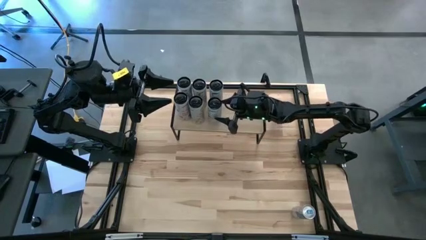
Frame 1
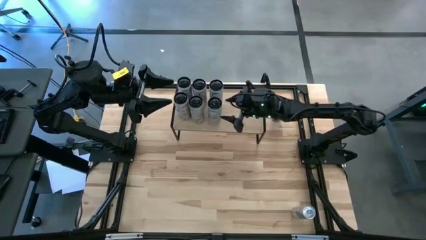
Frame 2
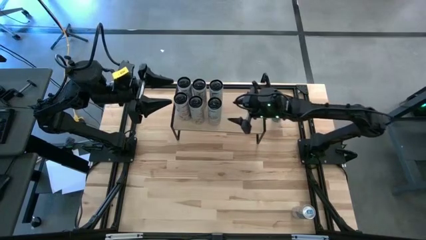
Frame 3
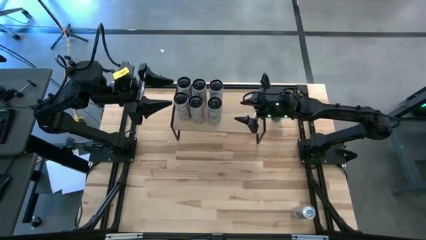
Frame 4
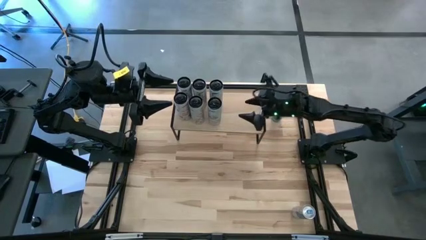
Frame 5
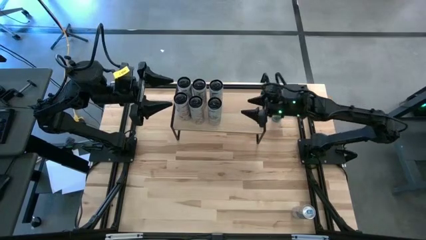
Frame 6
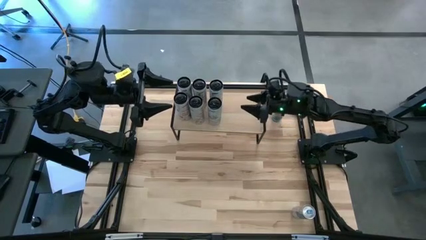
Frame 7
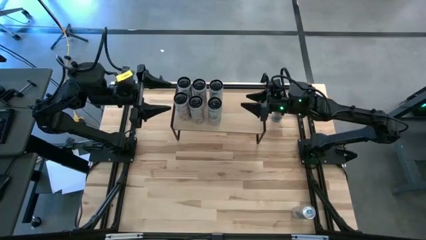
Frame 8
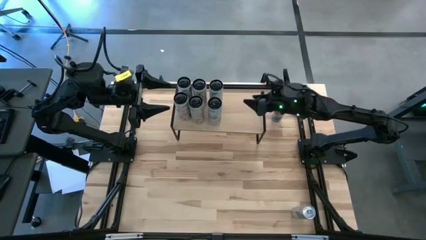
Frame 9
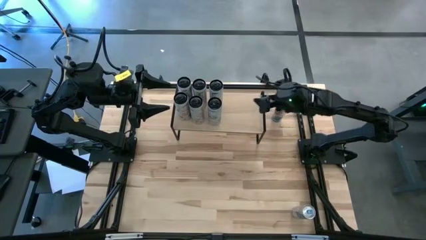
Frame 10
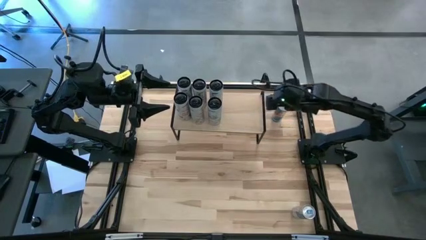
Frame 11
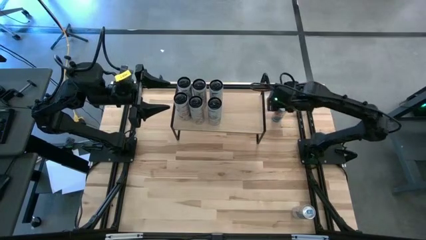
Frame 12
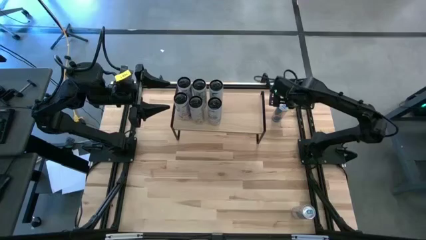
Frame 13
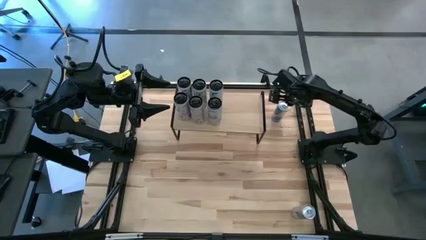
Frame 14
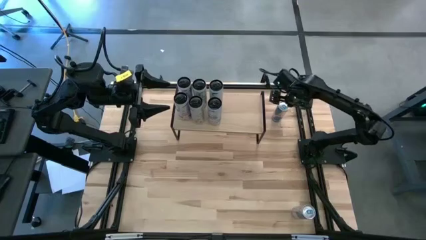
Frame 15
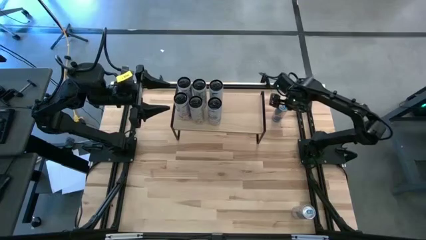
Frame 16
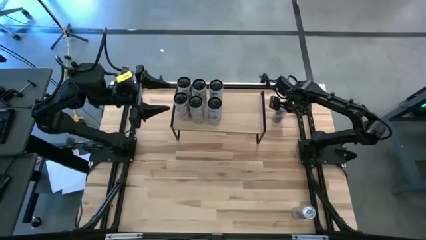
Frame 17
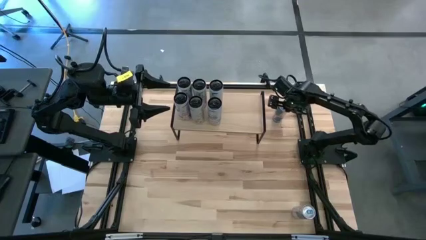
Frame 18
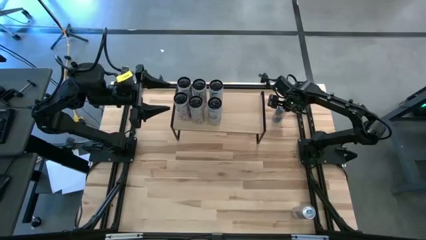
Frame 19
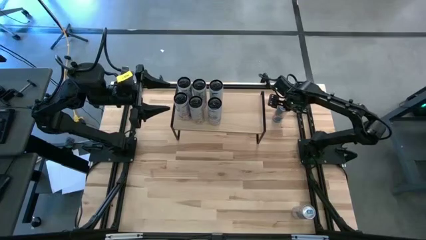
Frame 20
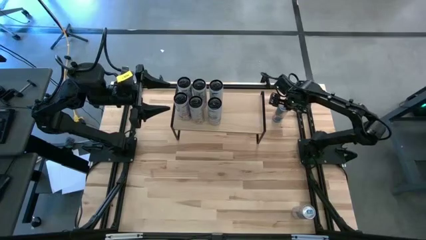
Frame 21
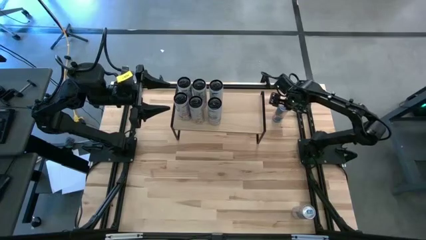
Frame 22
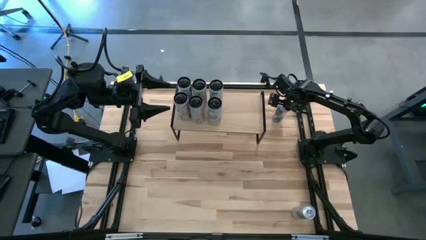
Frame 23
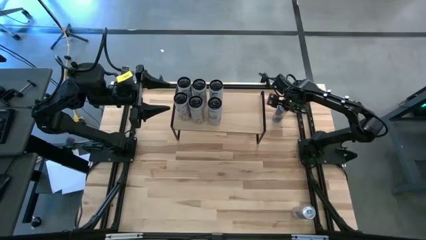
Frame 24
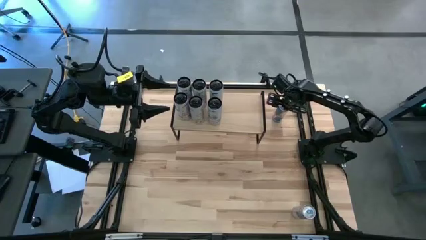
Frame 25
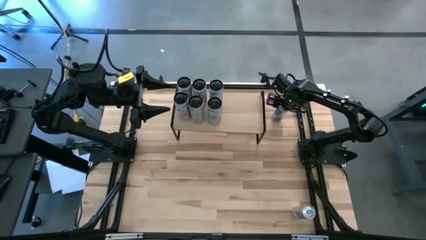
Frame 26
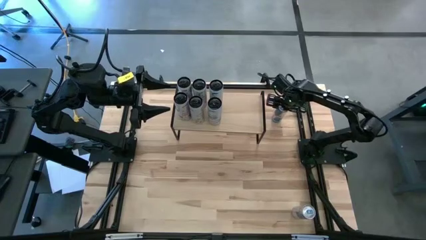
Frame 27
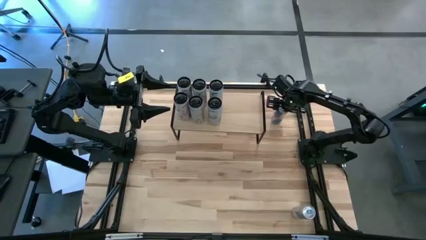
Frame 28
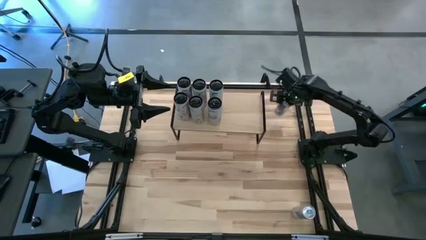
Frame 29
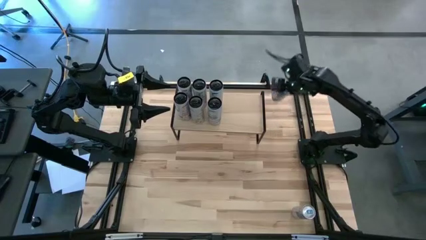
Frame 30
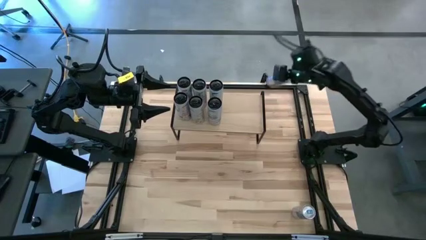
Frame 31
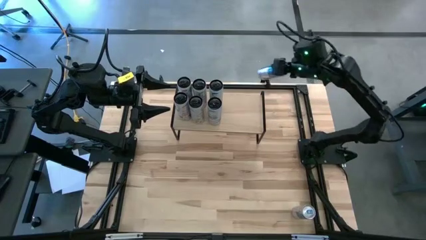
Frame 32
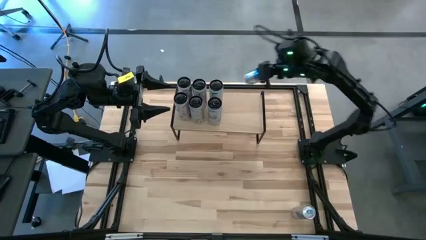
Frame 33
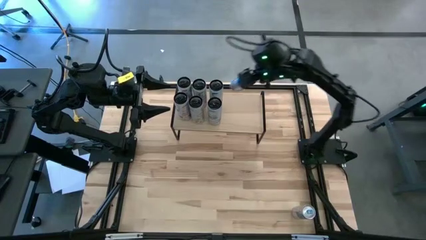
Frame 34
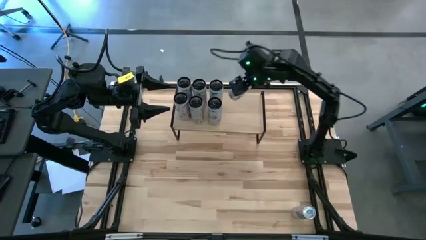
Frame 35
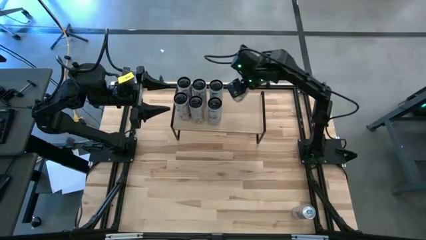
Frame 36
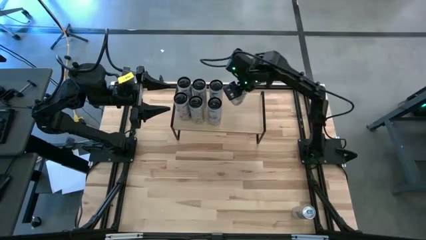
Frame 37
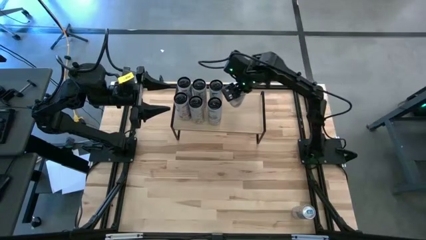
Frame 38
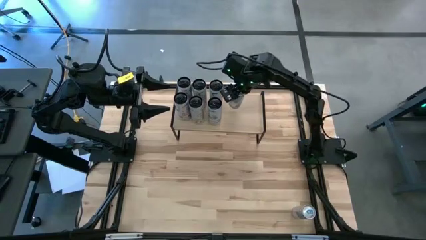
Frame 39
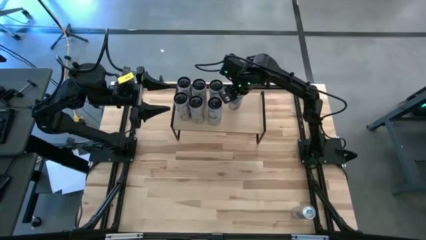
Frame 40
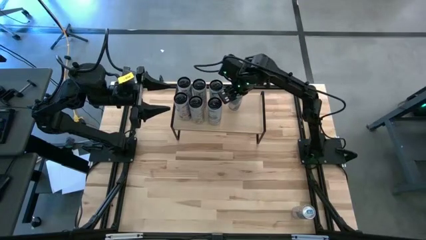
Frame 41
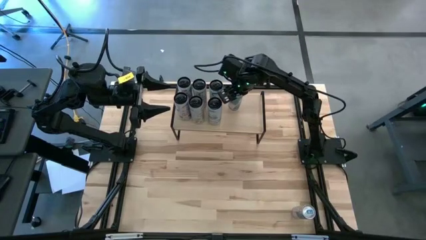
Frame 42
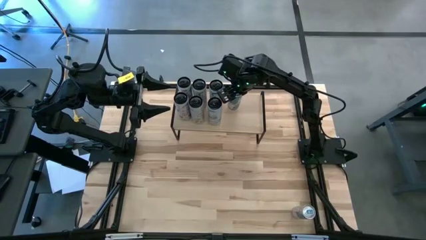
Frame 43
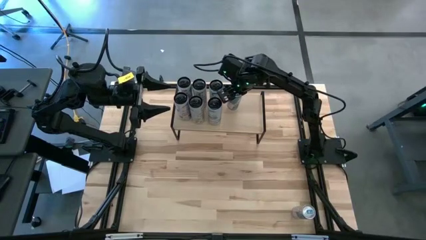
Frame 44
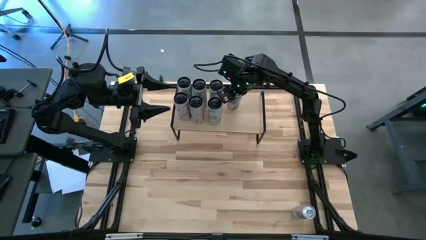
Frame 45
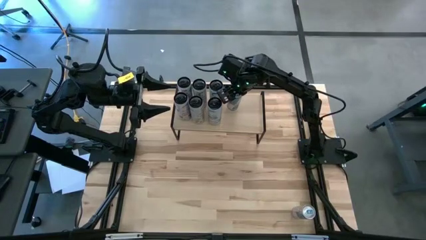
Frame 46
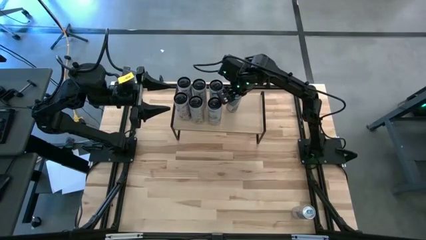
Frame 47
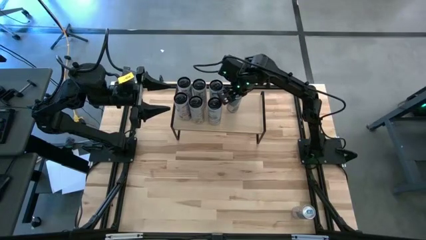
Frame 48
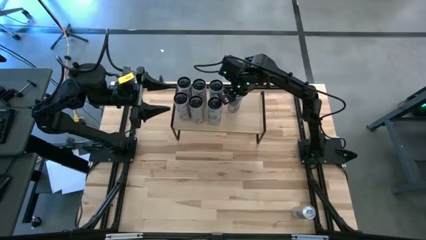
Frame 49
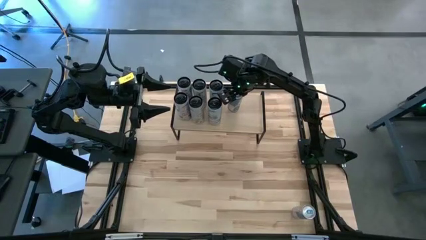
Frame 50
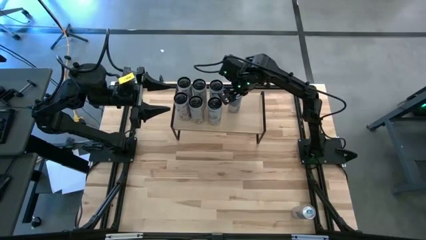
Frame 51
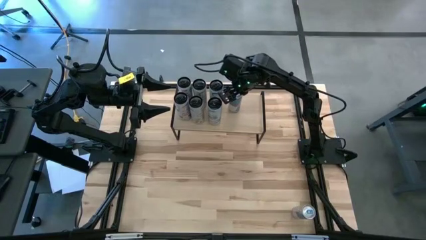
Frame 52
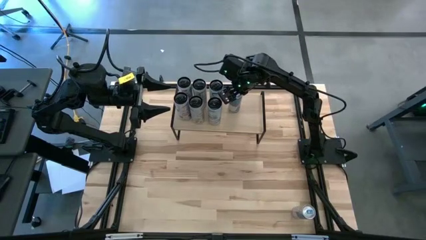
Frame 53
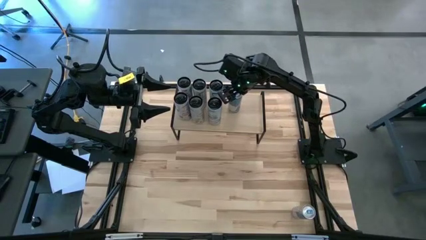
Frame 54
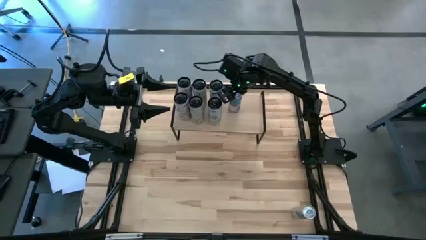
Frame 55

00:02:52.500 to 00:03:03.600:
Task: Place canned beverage on shelf
Put the top blue soda can on the shelf
